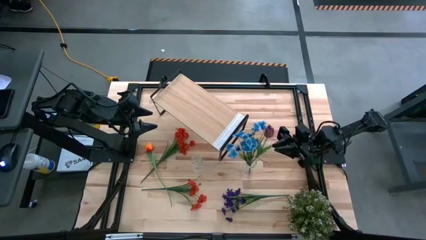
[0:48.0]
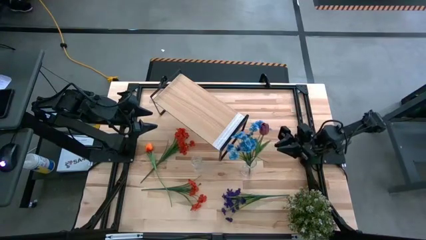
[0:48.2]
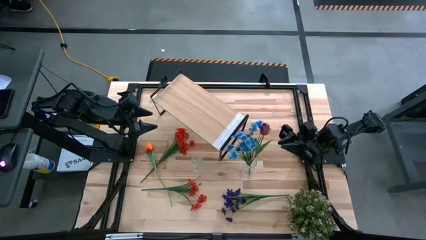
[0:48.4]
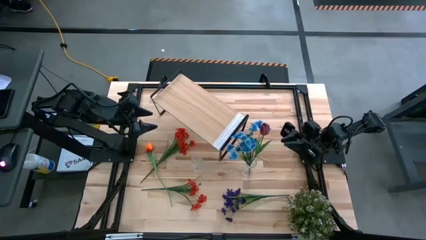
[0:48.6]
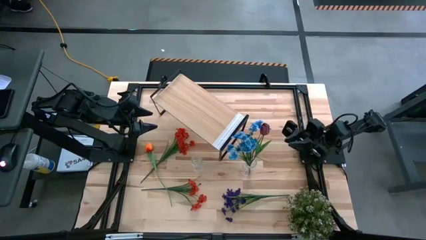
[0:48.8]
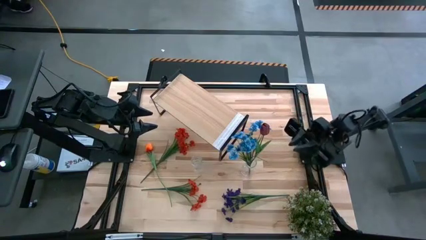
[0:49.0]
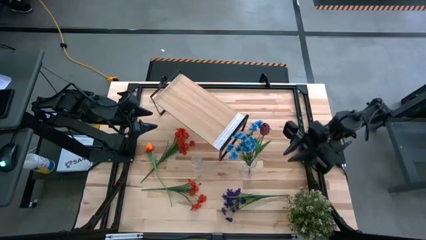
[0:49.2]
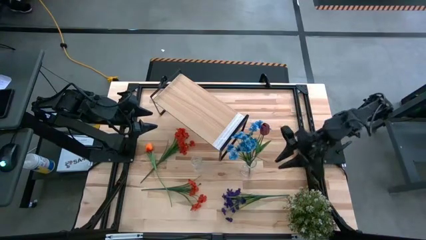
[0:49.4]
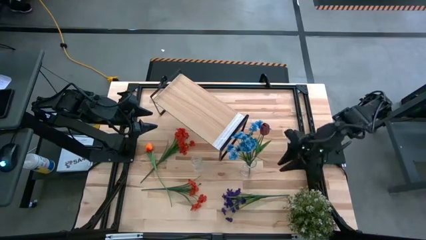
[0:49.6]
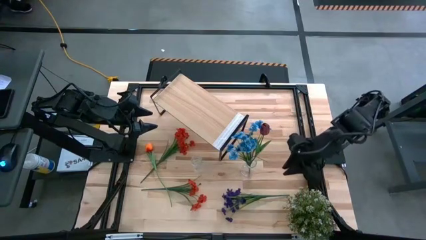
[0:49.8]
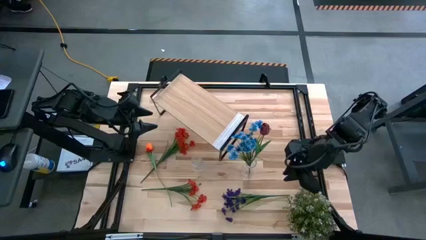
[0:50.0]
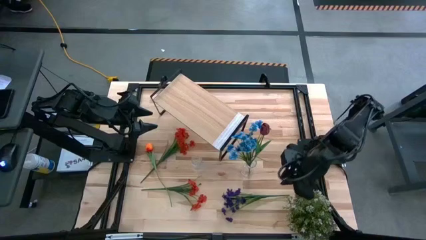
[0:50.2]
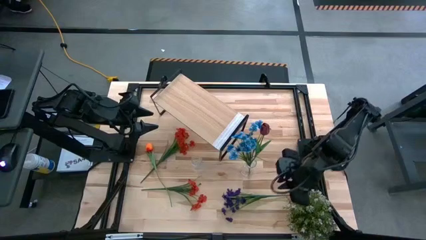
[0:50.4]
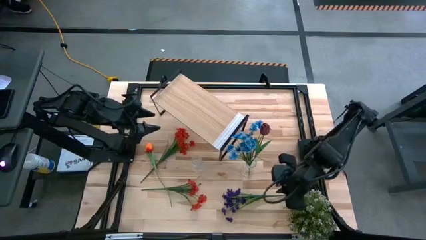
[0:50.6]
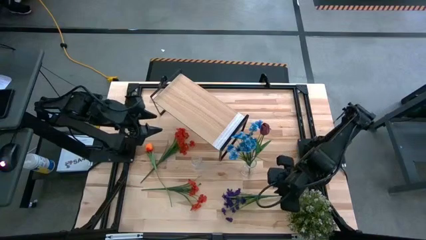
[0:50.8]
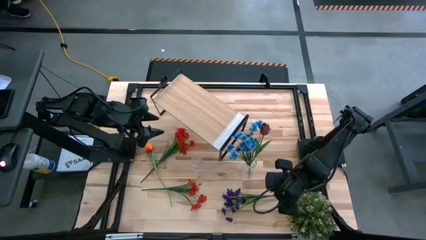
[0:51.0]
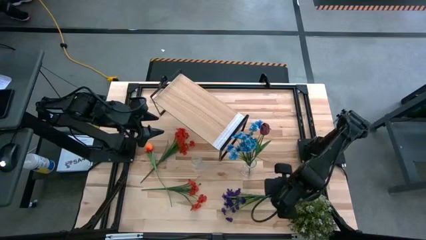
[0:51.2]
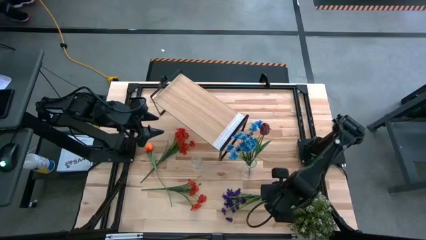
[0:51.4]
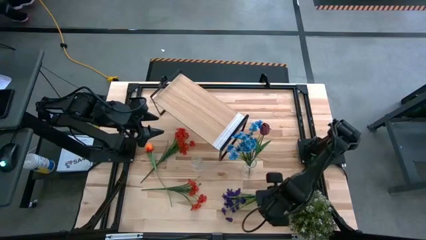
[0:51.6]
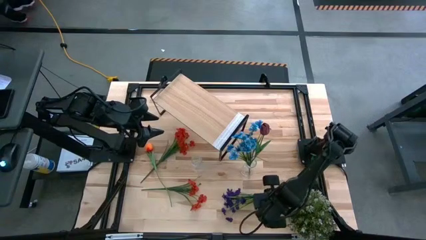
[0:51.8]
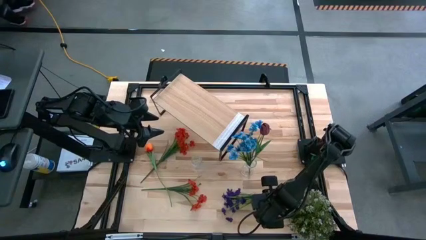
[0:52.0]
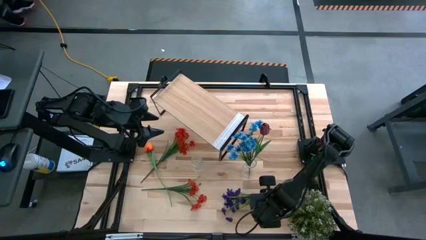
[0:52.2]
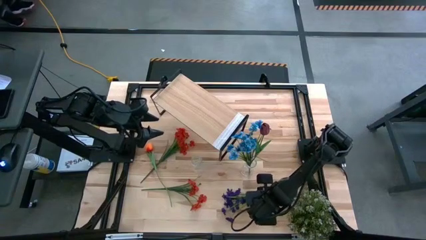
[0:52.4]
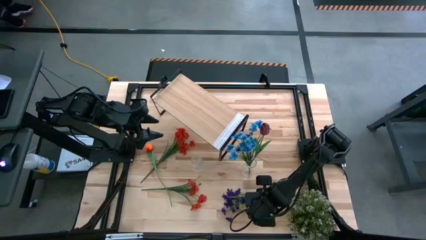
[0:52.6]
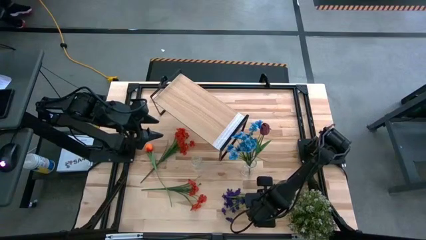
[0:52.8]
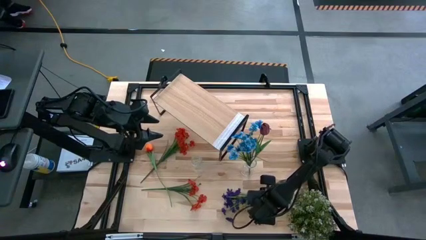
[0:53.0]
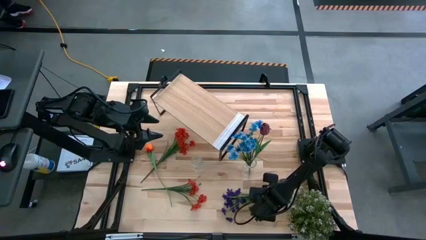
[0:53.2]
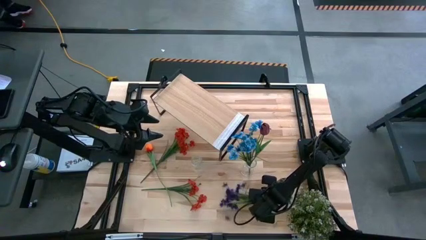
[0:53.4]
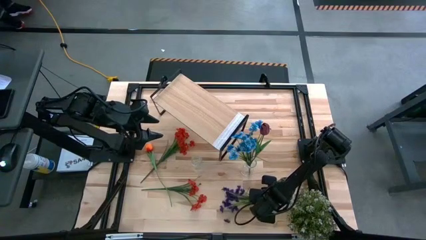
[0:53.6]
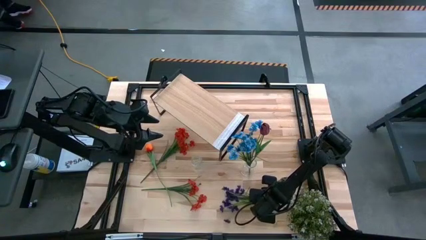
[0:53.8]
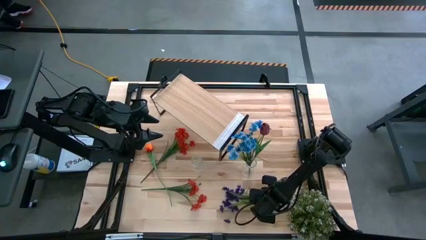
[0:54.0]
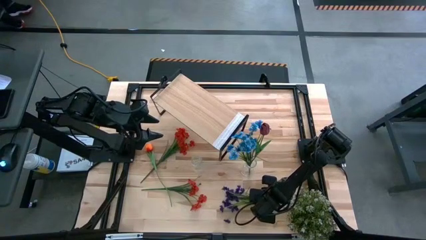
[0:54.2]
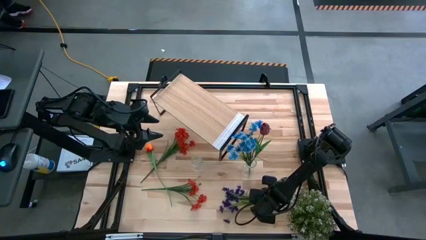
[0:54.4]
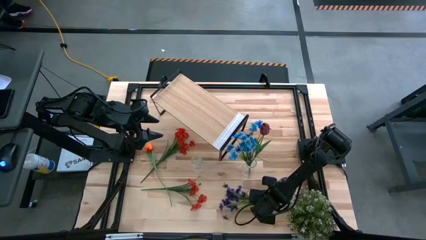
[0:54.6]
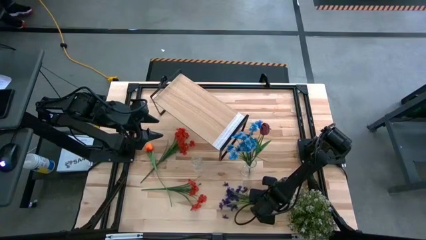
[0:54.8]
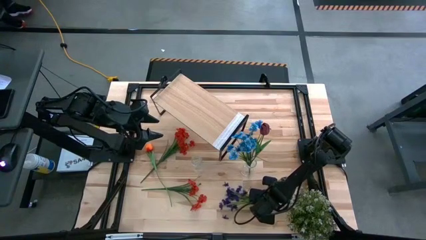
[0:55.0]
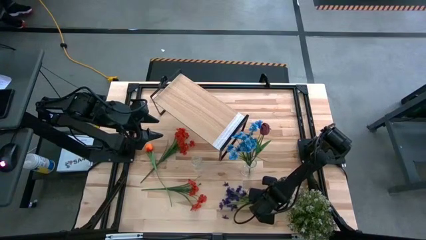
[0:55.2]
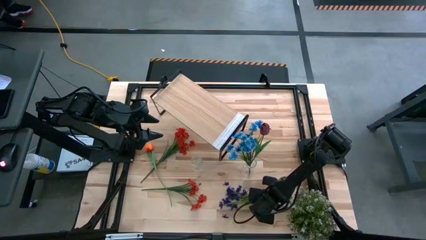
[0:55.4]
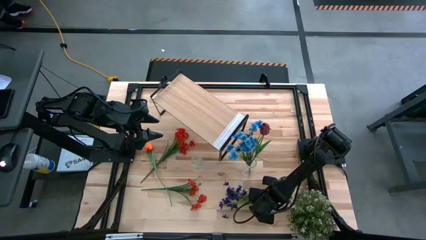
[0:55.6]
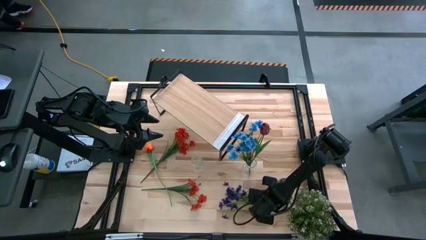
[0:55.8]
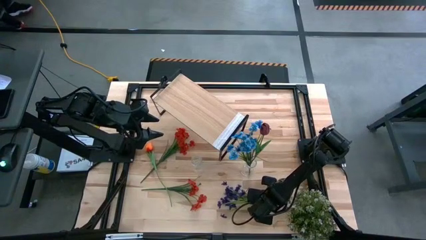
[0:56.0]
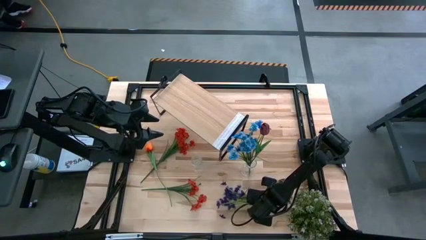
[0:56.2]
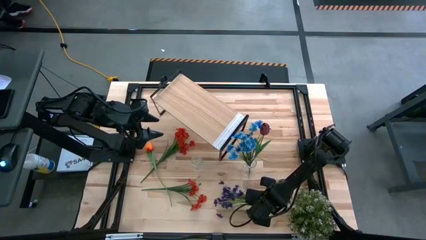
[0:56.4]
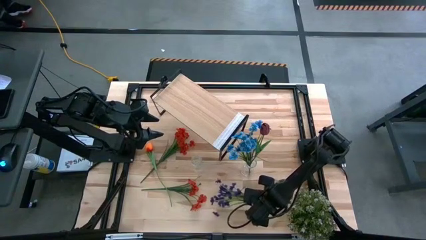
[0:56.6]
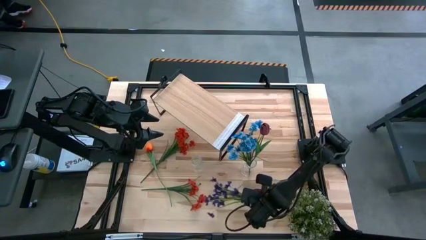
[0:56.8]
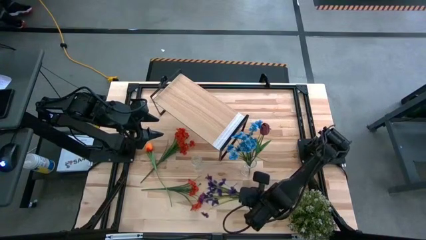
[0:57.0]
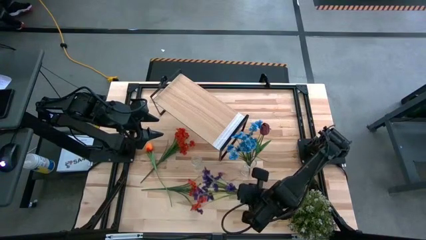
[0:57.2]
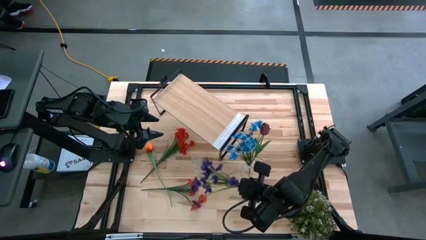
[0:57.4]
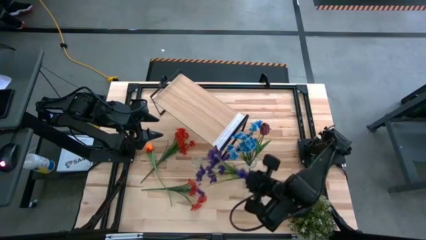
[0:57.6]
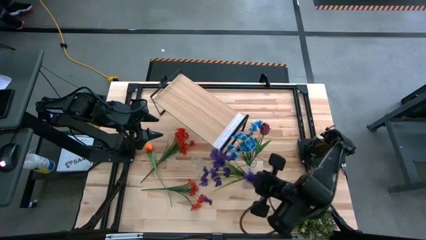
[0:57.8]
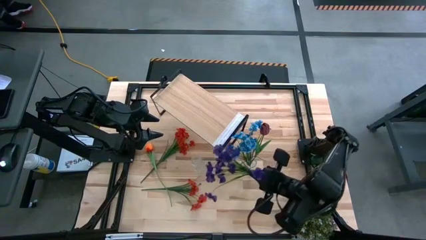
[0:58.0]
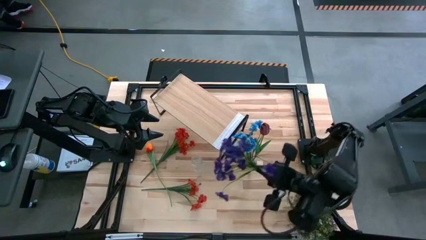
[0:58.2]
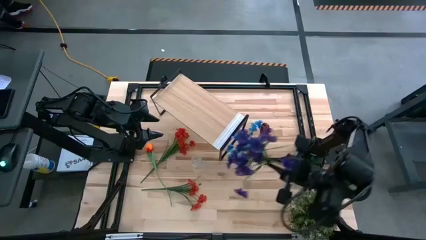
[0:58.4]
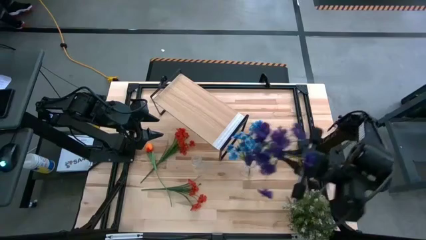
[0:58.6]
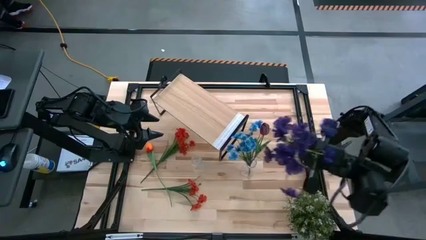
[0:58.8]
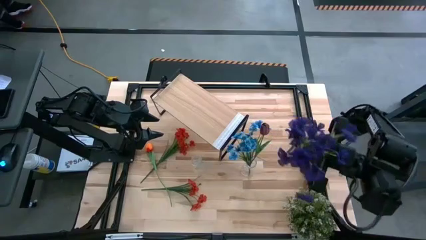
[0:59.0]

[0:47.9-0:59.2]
Task: Pick and place flowers into a vace then onto a shelf
Put the violet flowers into the right transparent vase

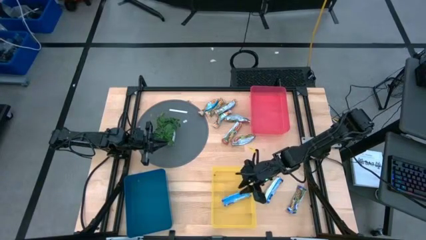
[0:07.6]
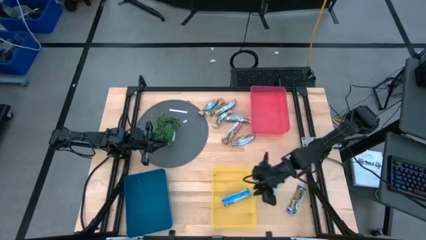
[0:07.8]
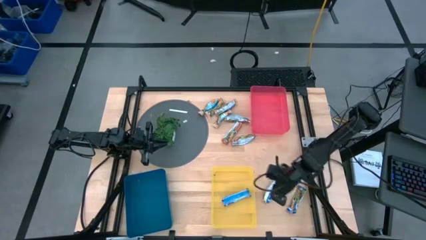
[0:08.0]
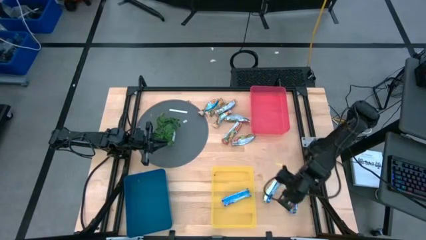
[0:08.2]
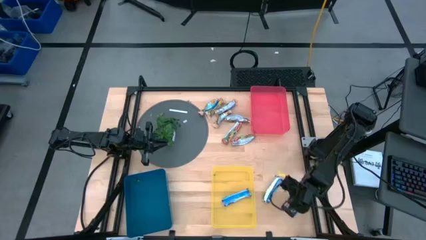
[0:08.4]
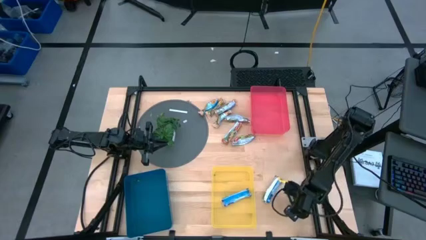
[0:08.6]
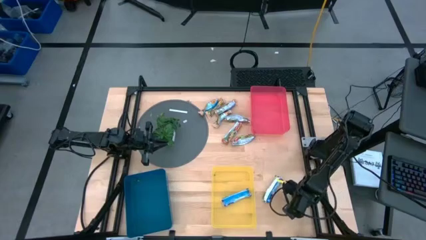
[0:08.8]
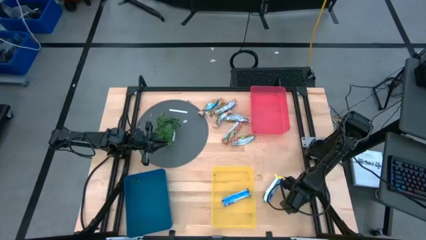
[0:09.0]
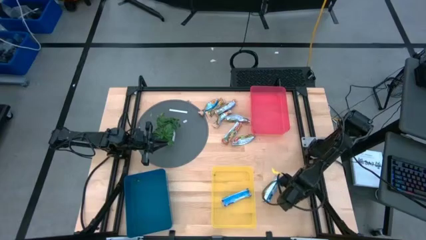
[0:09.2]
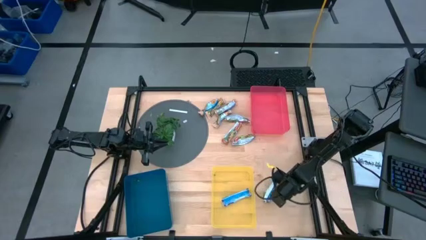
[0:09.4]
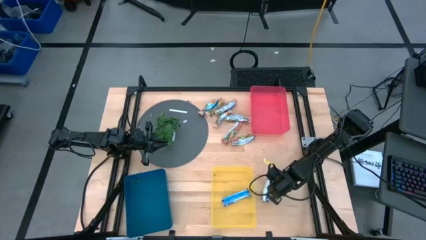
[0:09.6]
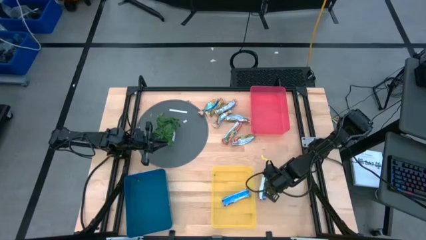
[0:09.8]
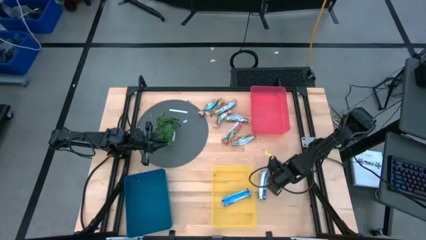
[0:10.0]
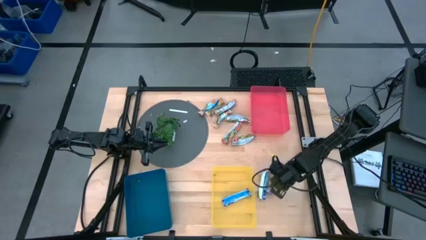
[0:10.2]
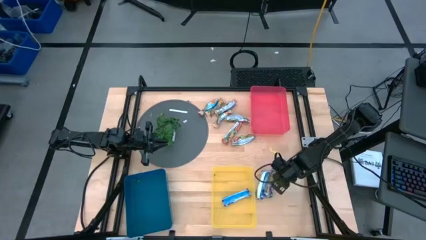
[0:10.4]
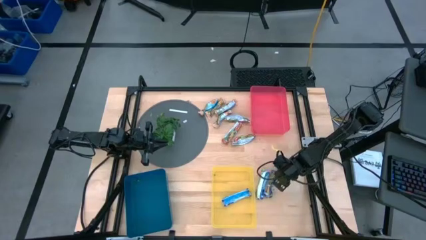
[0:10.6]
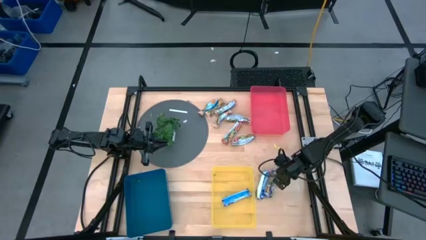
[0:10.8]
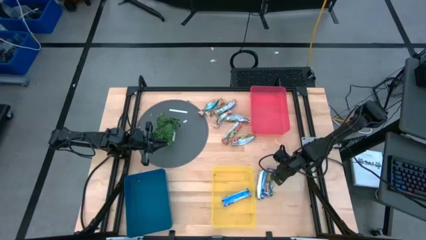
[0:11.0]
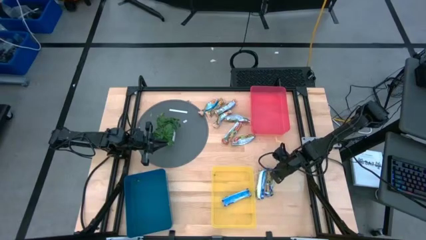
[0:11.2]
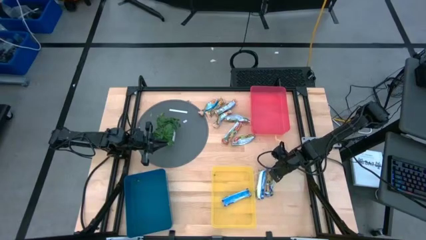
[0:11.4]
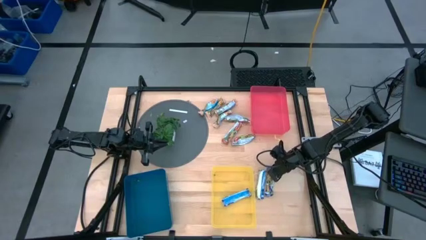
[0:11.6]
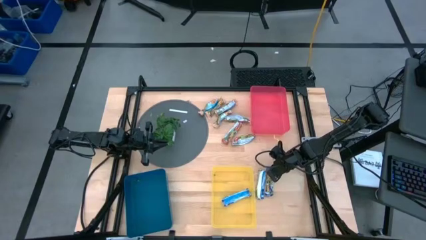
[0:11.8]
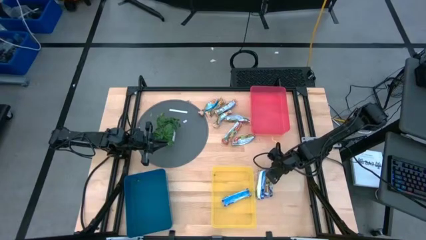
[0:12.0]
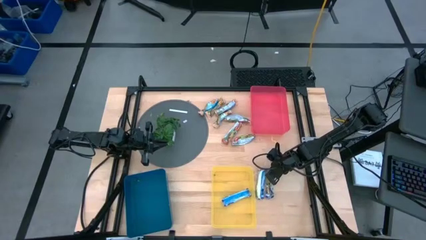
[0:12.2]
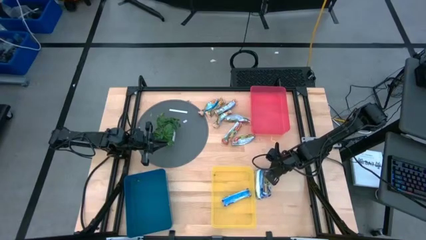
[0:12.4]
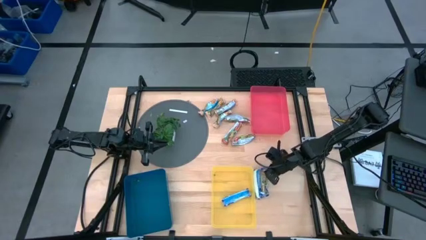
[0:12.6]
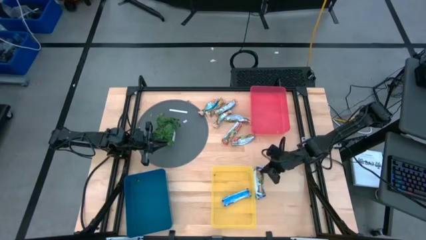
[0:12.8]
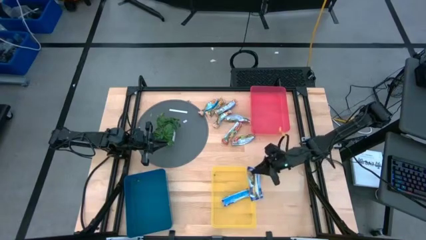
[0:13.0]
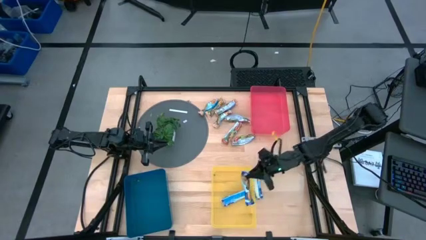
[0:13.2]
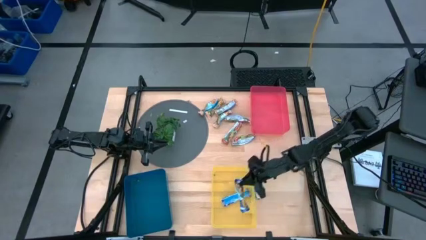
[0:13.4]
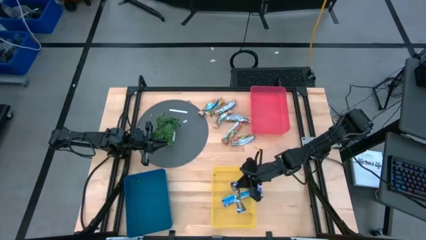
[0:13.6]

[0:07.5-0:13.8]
Task: Pick and place Granola Bars by type
Put the green snack into the yellow bin
